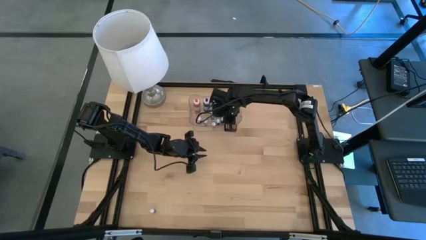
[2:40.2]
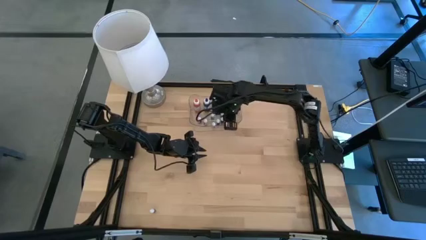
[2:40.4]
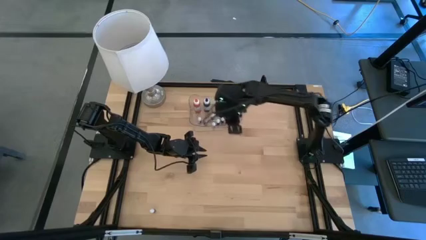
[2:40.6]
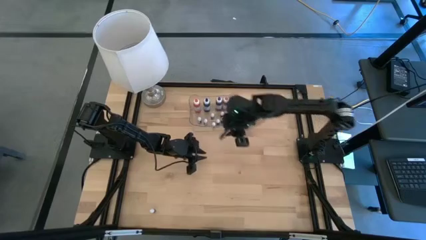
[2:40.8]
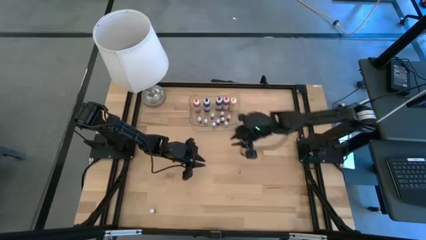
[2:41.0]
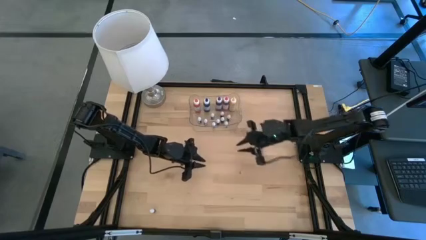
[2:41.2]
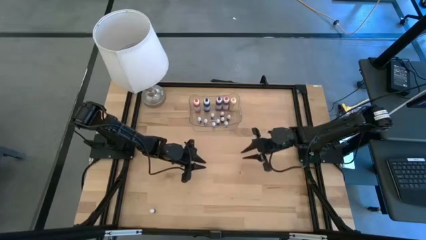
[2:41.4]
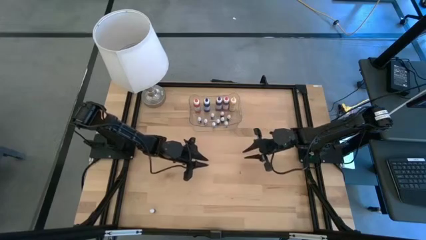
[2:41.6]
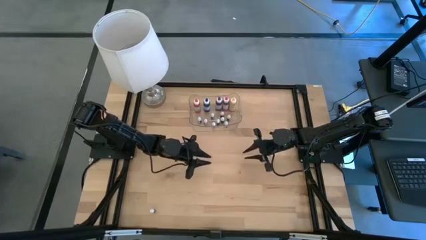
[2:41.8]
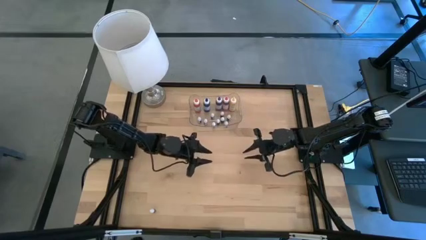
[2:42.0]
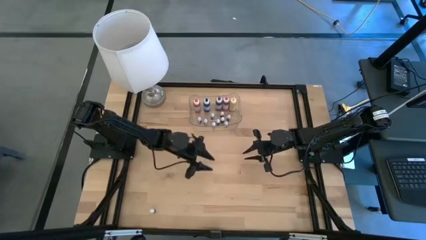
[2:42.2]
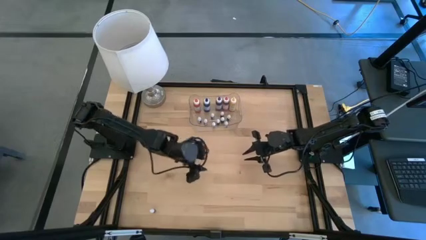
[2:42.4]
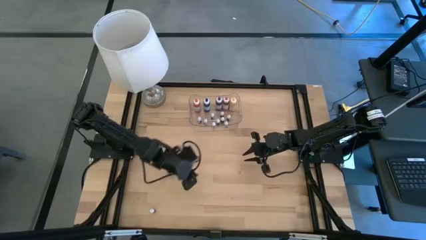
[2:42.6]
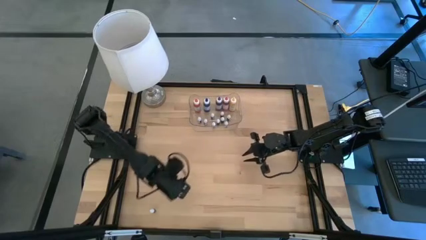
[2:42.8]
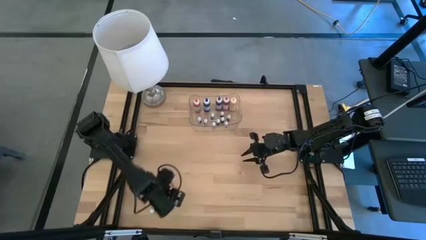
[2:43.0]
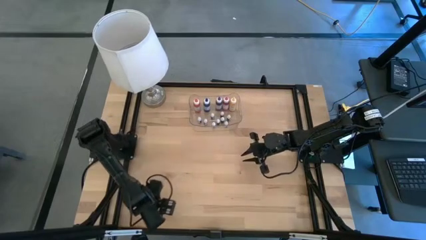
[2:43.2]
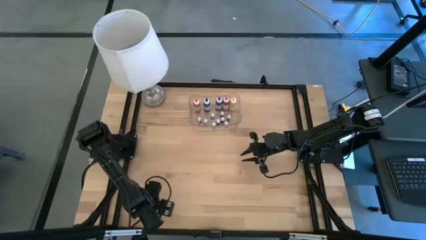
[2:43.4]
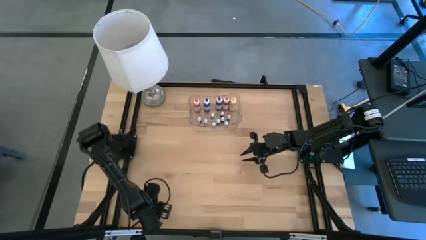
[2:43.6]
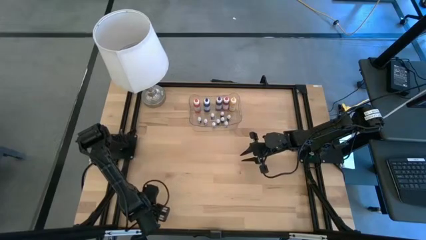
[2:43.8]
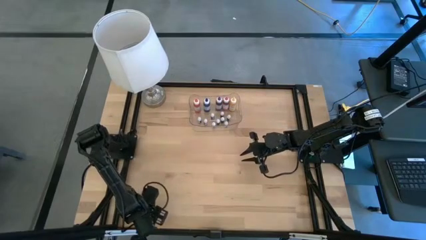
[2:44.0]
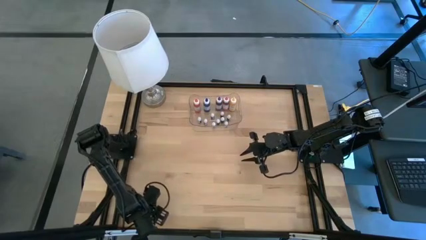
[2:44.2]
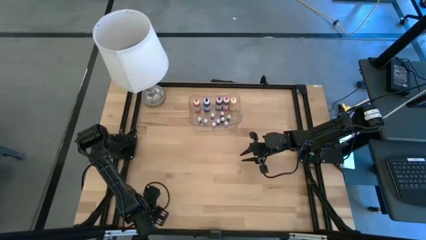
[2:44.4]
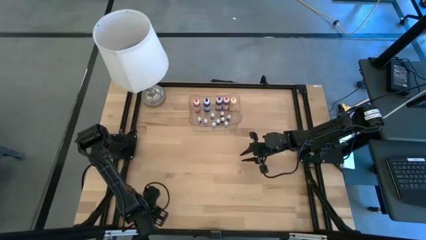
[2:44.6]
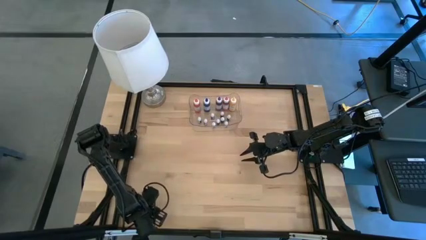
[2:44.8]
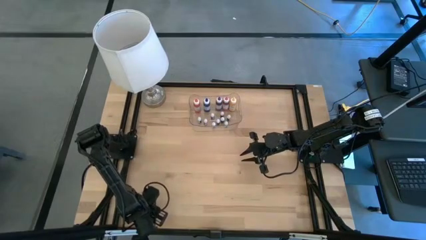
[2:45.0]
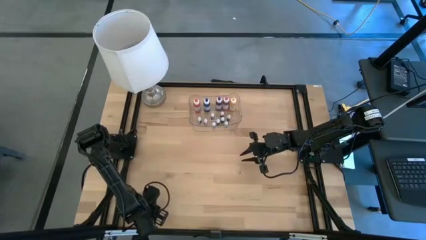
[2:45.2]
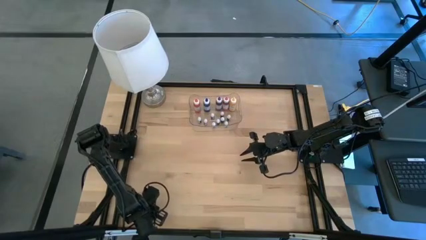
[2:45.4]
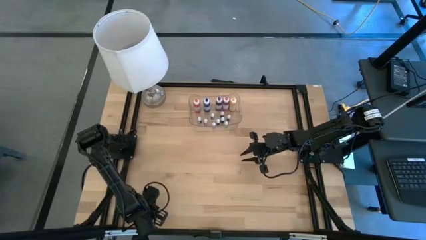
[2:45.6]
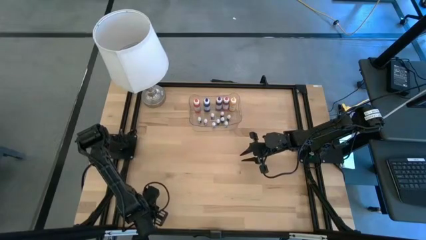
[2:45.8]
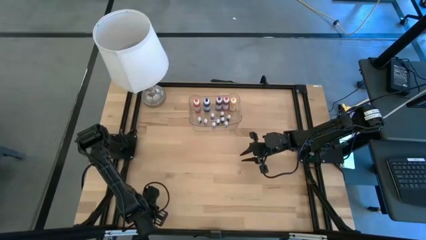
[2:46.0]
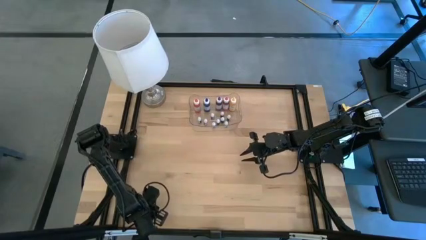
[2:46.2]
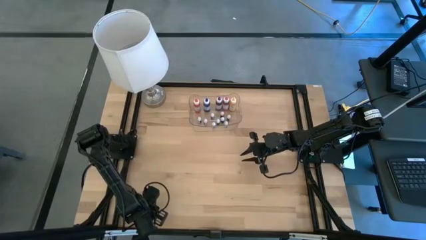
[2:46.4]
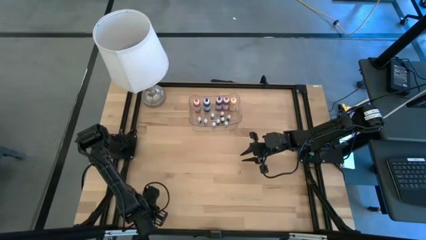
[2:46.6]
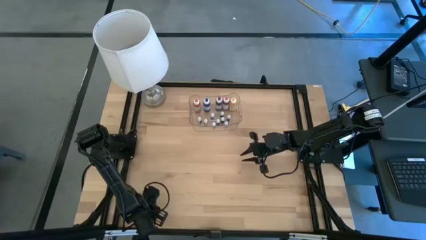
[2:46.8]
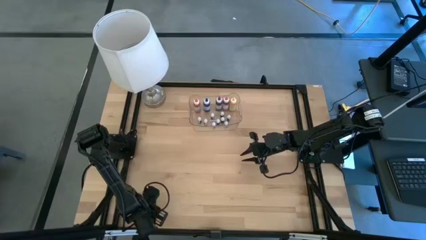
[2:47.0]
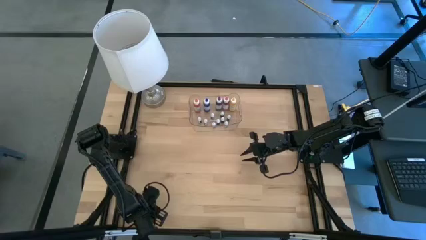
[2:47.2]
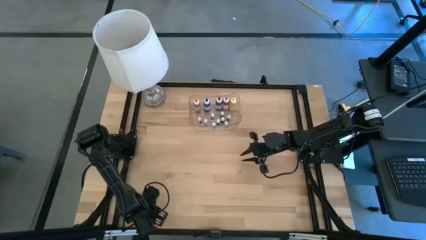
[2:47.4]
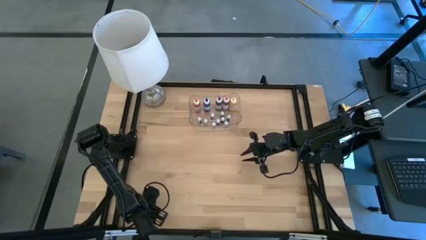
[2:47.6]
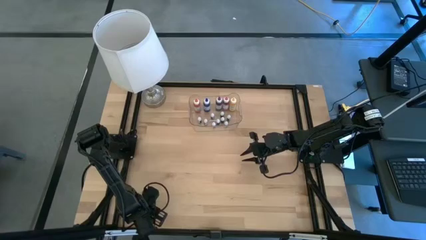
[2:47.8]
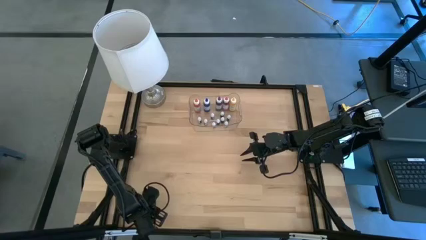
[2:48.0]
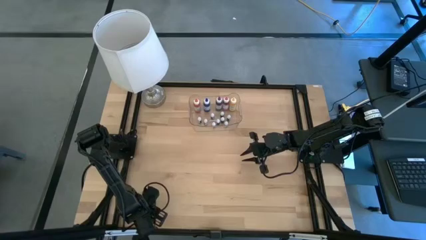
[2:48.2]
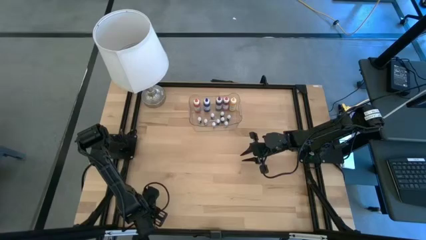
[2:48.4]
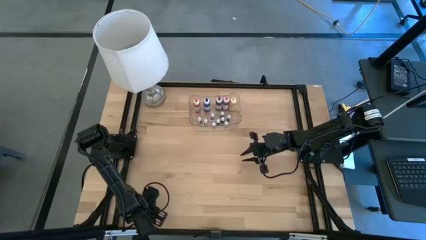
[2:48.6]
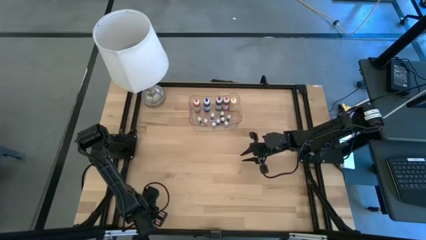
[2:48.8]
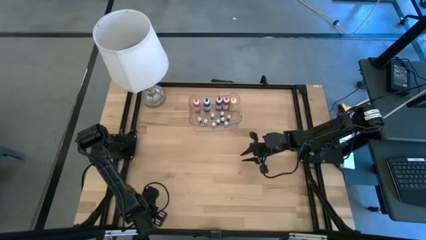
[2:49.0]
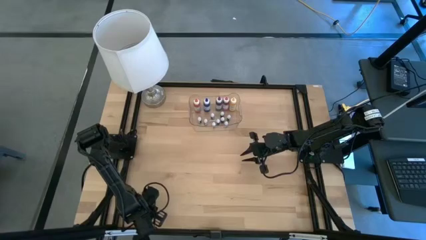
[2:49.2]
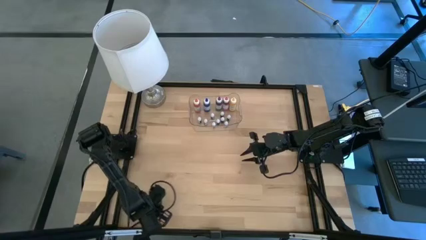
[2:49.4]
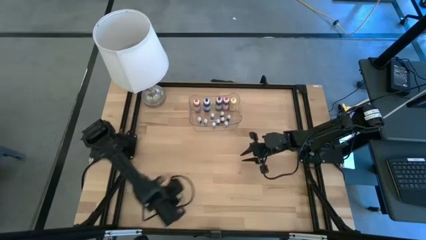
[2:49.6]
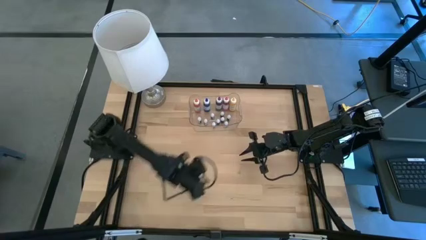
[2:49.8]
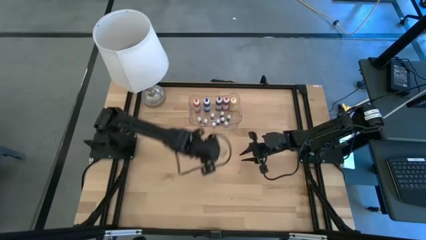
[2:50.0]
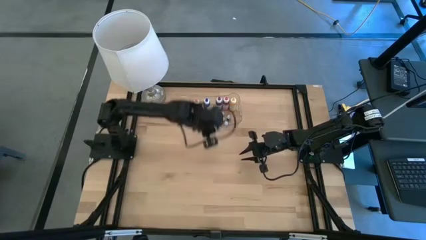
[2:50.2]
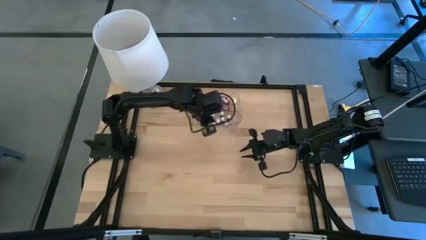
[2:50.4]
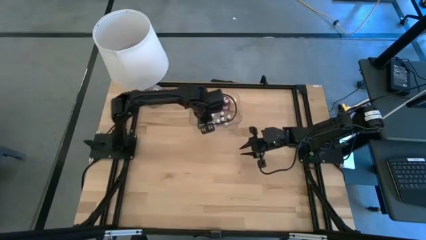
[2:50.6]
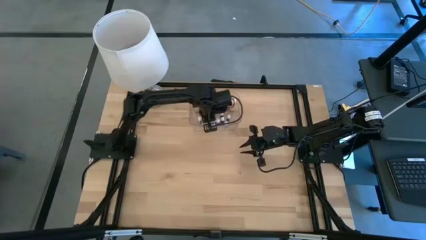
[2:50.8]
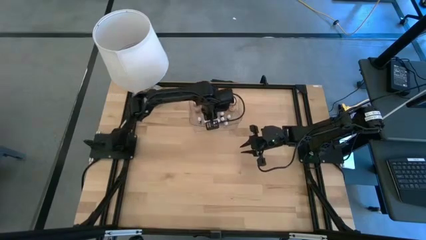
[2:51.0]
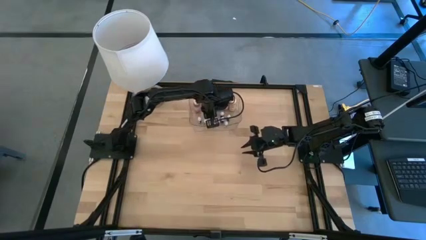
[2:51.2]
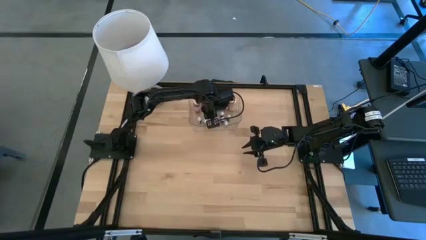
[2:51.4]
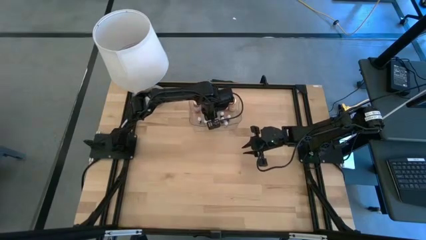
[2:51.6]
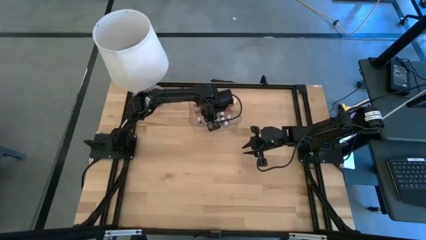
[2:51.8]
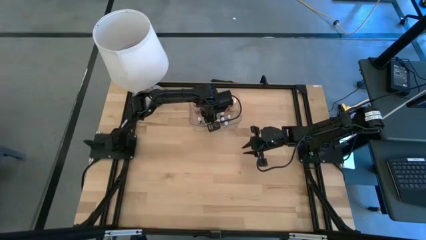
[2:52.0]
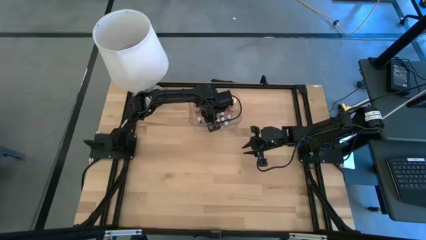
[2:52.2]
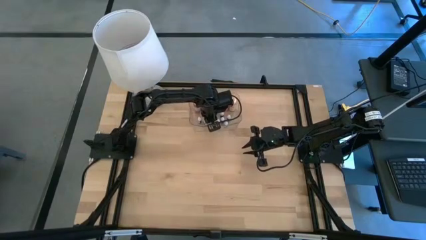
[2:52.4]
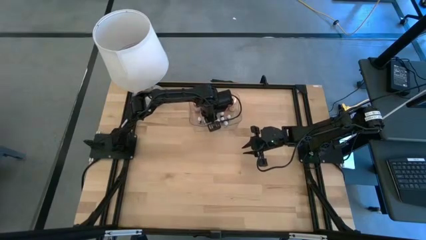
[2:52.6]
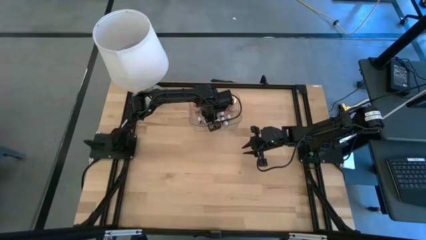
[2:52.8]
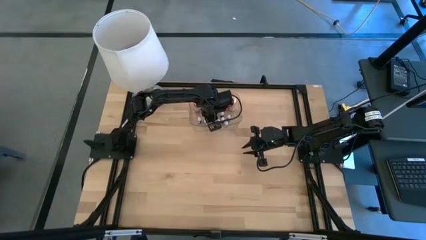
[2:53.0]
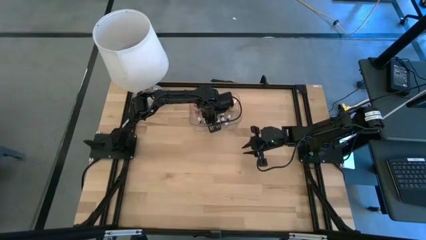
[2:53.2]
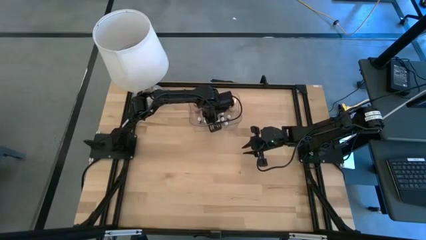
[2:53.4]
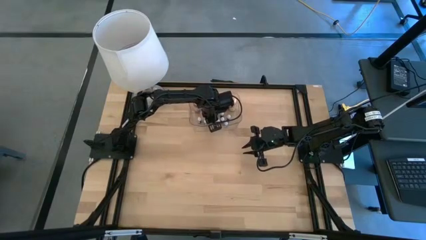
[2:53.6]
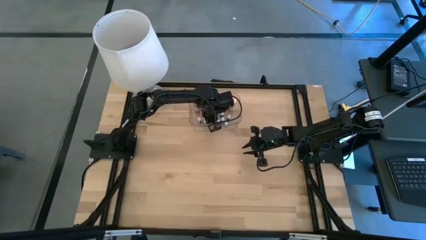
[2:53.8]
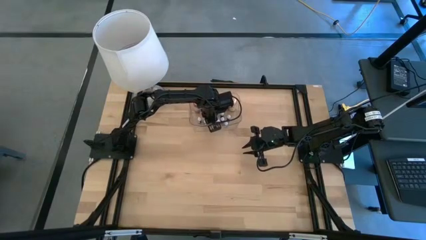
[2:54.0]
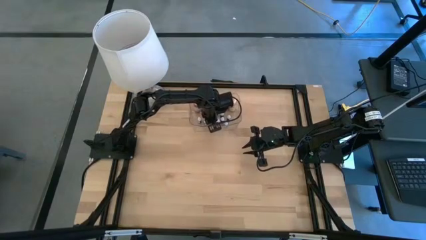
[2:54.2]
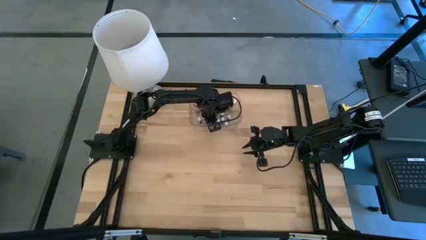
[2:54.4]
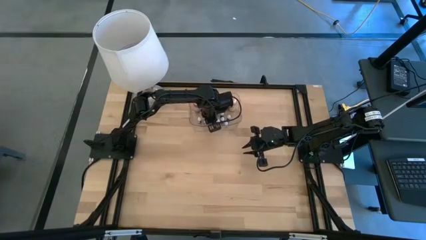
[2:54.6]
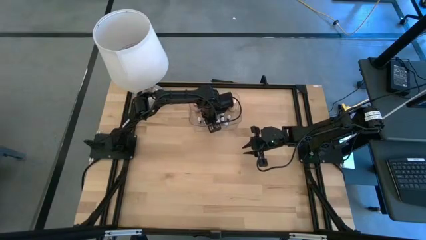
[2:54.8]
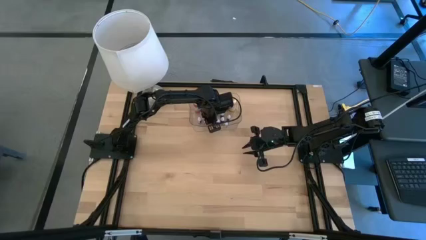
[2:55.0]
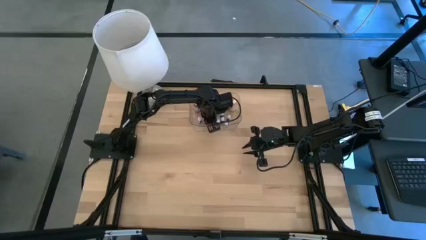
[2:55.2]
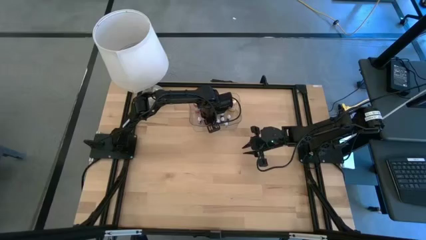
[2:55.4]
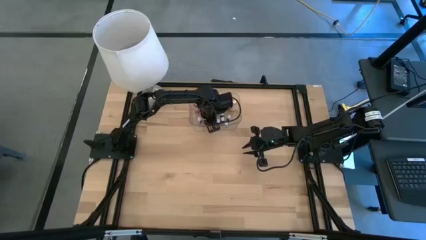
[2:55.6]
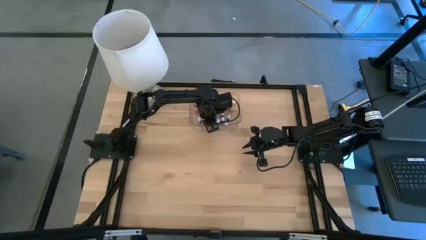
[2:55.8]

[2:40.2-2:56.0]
Task: Pick & Place food coloring
Put the small purple food coloring bottle into the transparent bin

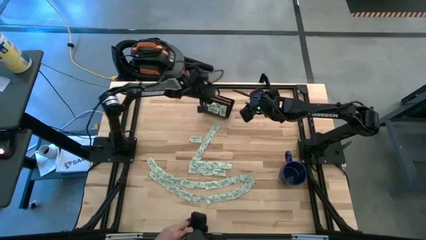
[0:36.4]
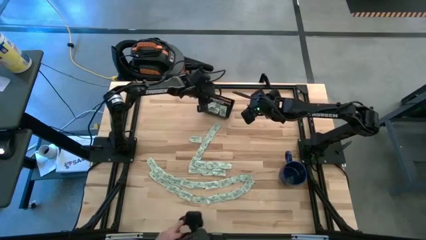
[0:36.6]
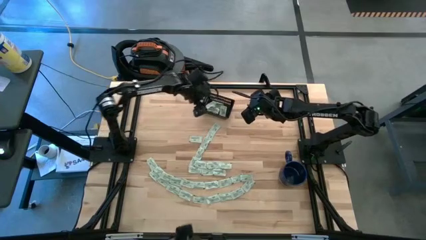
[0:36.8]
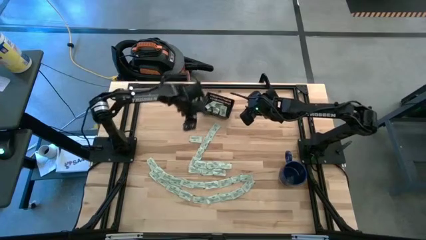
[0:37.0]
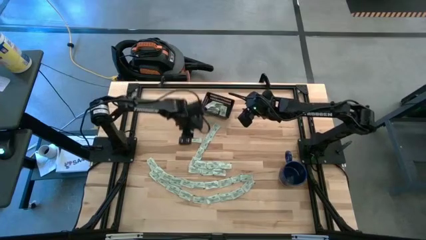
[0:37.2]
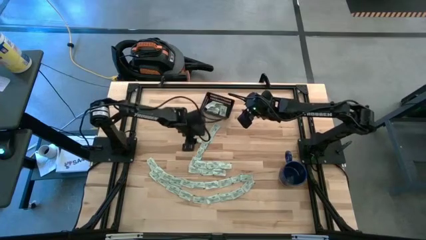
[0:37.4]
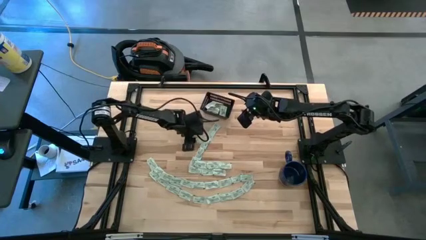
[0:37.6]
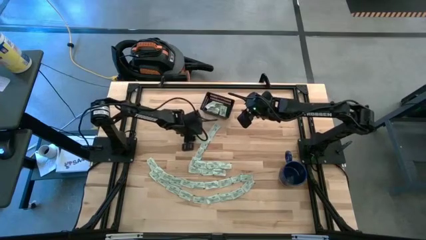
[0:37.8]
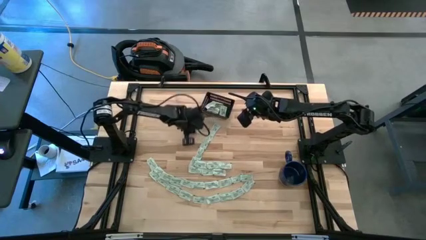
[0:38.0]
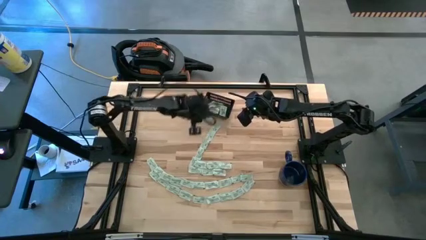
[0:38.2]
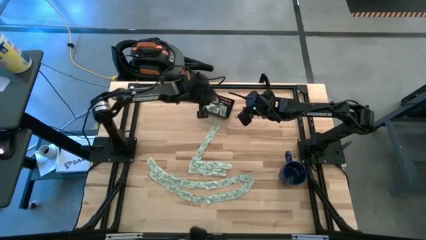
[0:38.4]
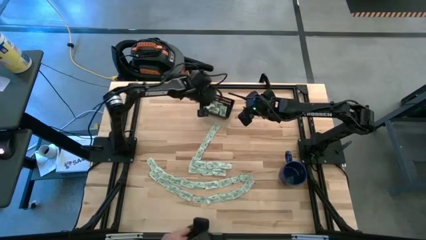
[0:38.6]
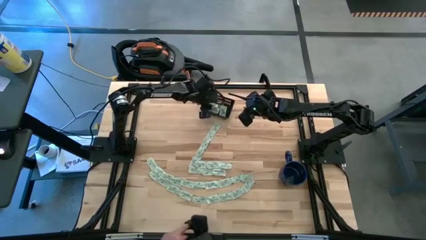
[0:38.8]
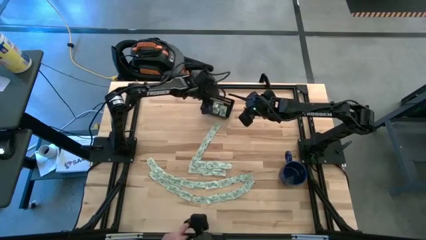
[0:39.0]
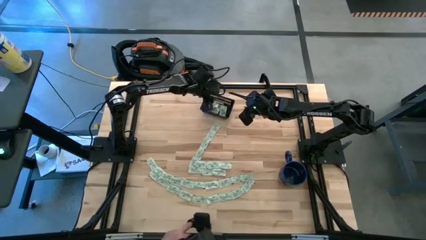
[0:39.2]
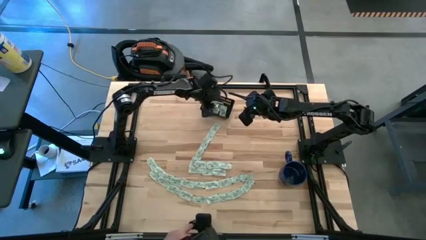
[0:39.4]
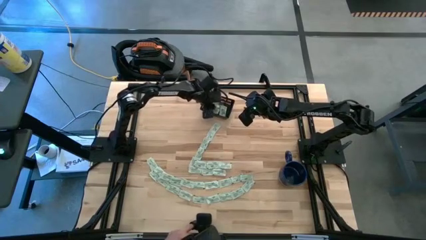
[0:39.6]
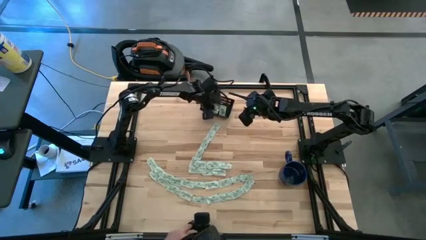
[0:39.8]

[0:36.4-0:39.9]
Task: Pick and place Stevia / Truvia into bins
Put the stevia packet into the black bin
